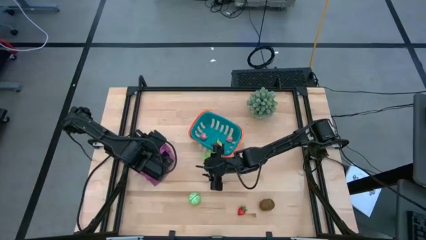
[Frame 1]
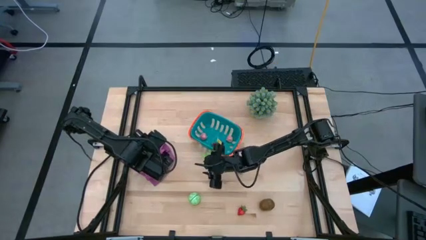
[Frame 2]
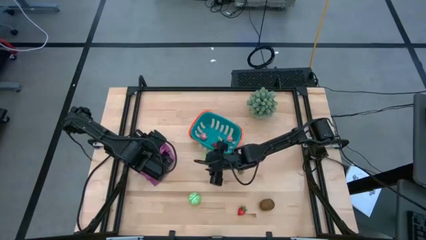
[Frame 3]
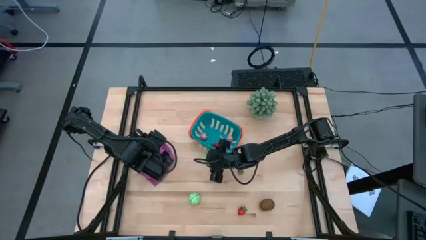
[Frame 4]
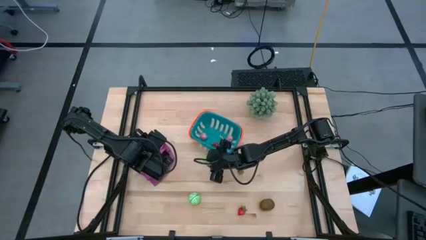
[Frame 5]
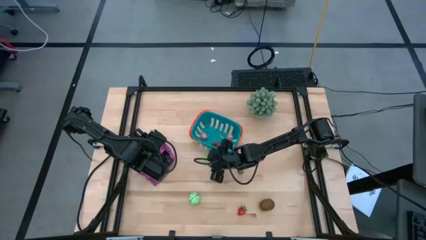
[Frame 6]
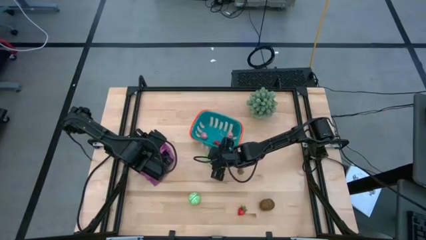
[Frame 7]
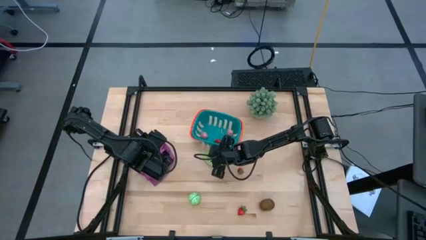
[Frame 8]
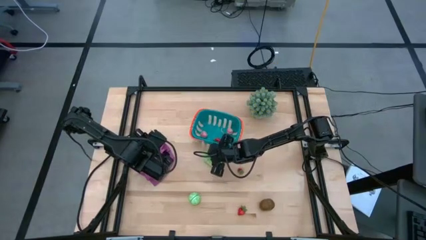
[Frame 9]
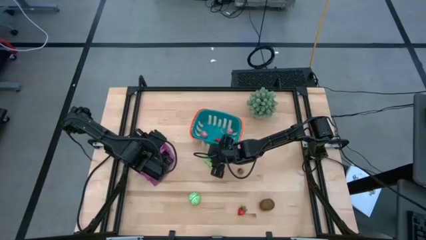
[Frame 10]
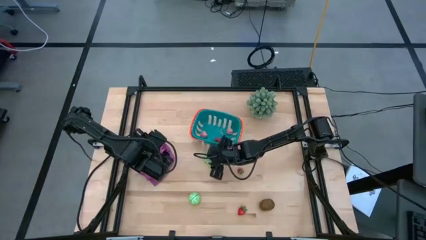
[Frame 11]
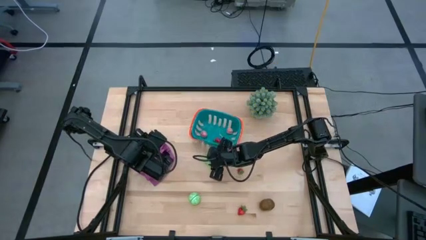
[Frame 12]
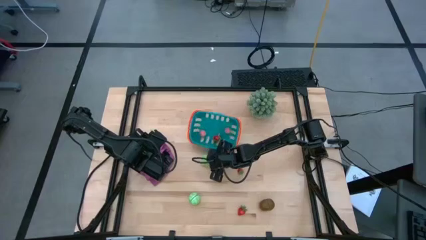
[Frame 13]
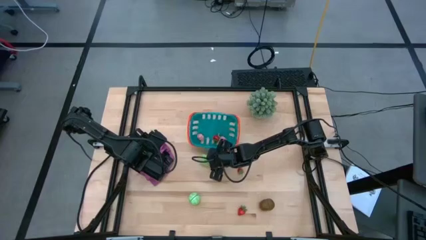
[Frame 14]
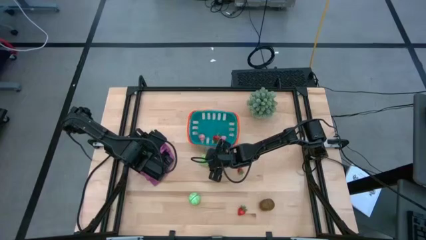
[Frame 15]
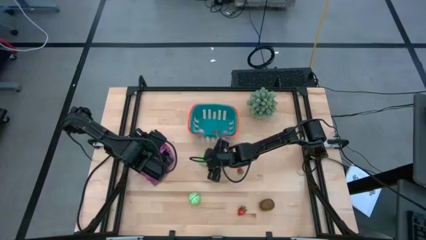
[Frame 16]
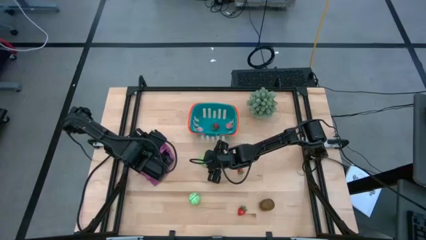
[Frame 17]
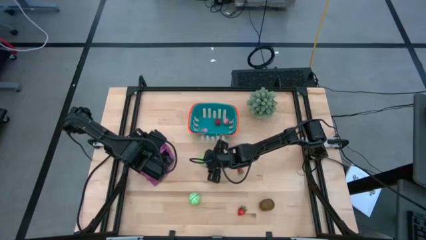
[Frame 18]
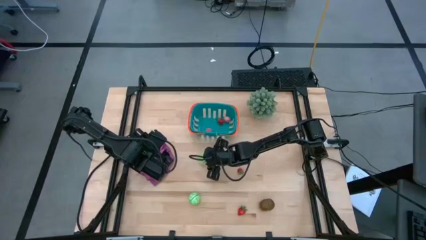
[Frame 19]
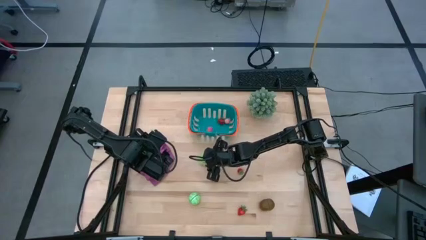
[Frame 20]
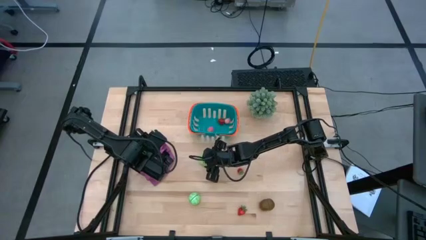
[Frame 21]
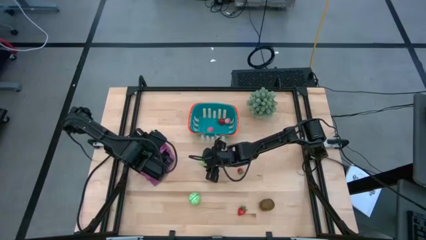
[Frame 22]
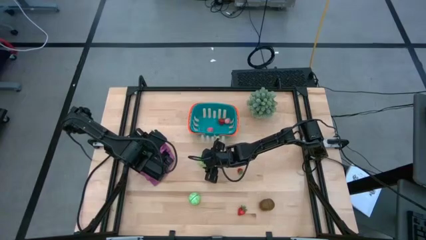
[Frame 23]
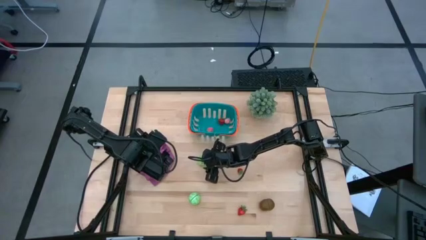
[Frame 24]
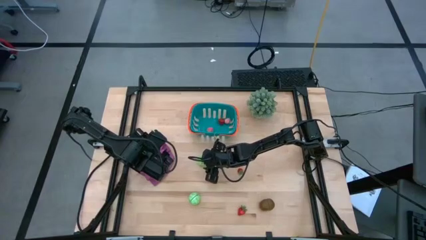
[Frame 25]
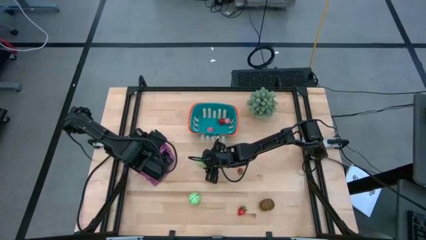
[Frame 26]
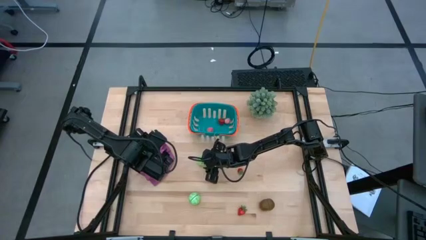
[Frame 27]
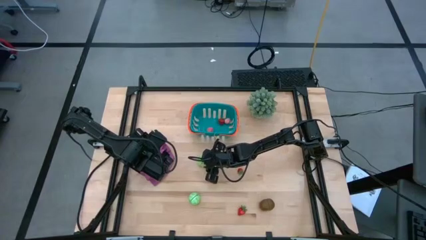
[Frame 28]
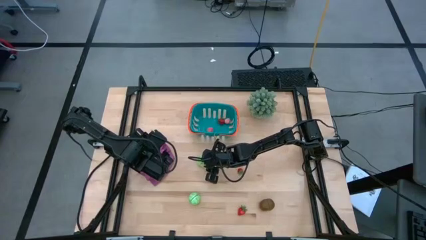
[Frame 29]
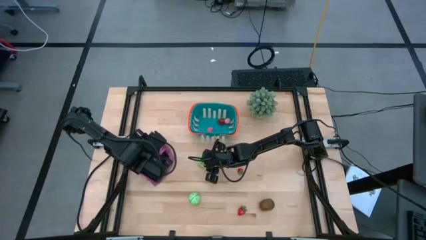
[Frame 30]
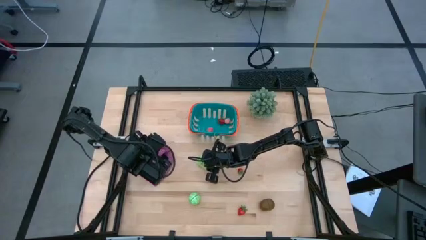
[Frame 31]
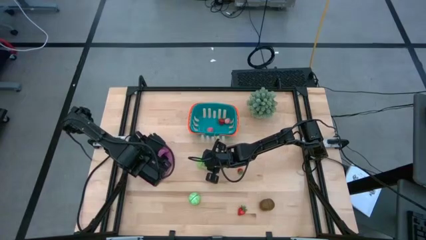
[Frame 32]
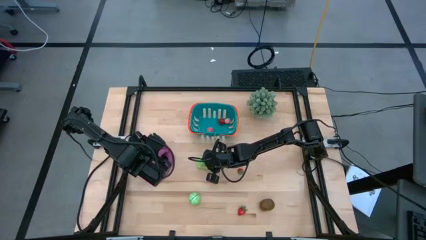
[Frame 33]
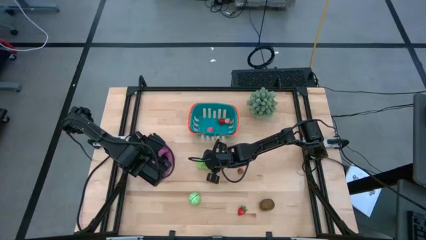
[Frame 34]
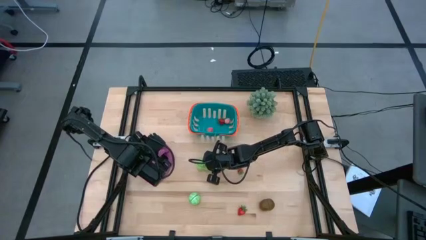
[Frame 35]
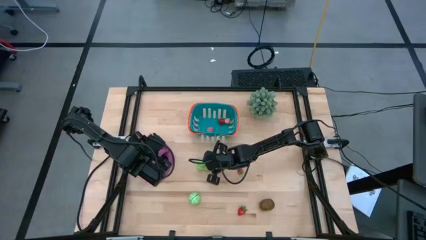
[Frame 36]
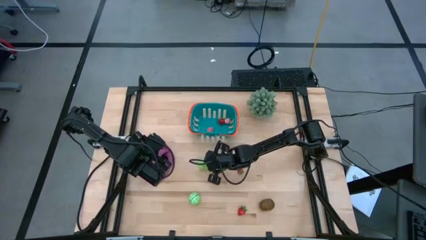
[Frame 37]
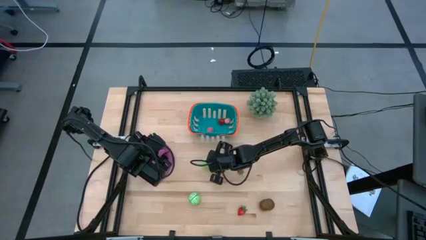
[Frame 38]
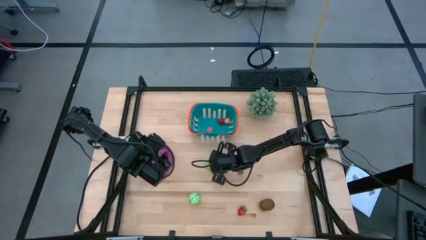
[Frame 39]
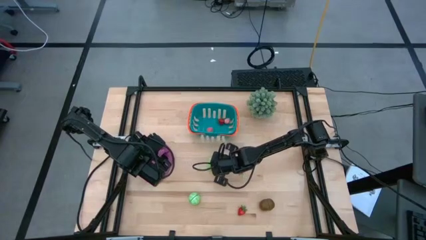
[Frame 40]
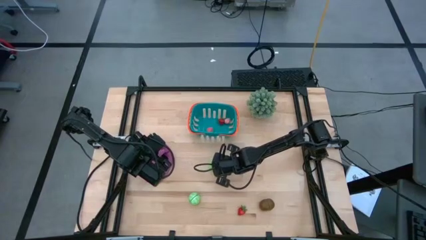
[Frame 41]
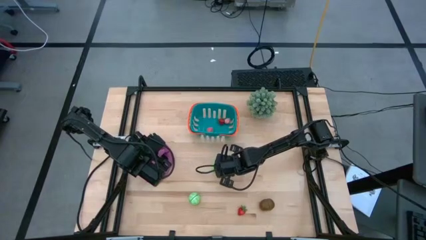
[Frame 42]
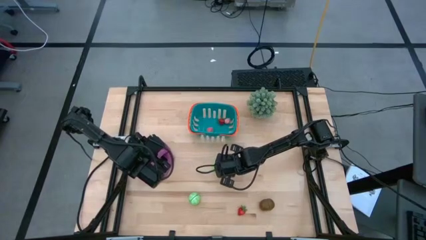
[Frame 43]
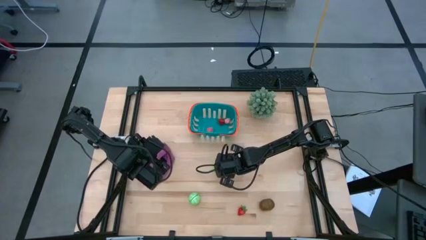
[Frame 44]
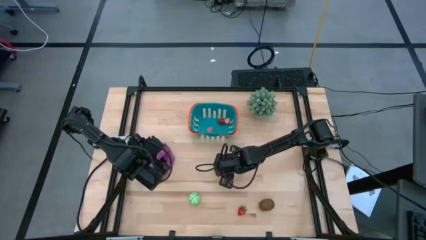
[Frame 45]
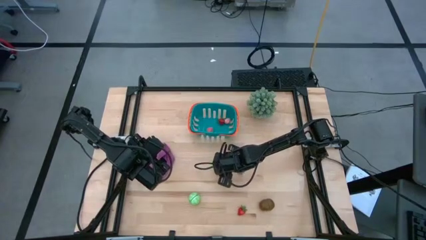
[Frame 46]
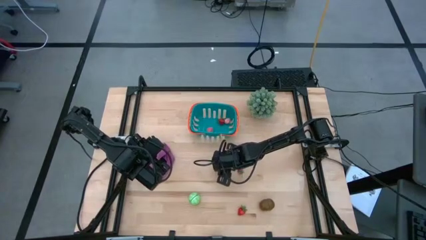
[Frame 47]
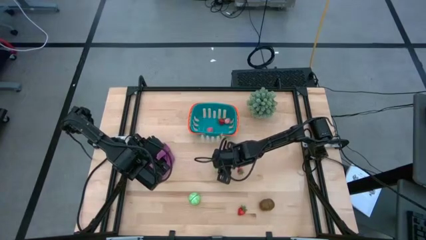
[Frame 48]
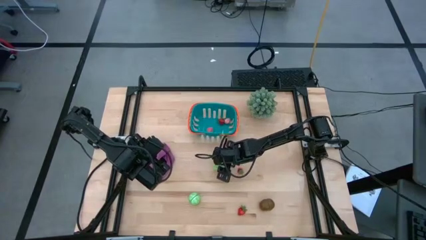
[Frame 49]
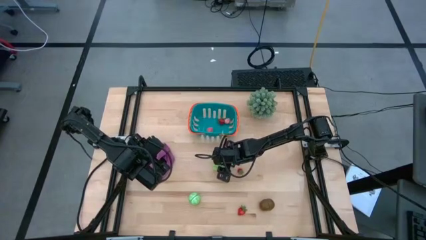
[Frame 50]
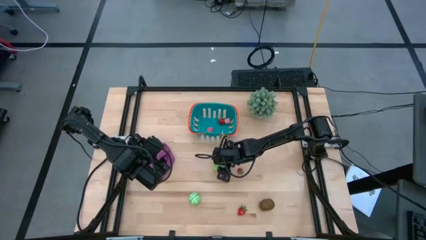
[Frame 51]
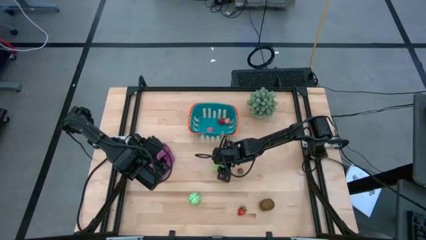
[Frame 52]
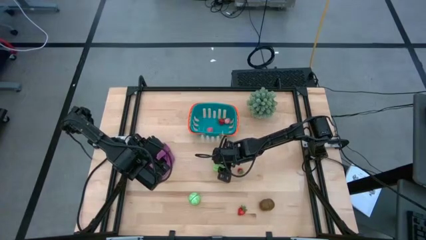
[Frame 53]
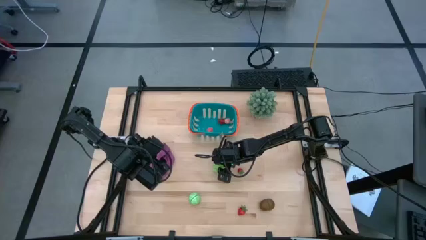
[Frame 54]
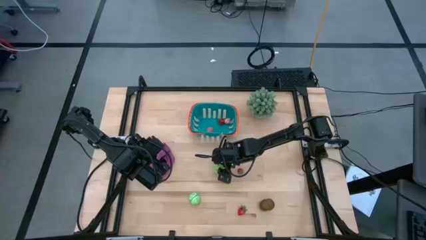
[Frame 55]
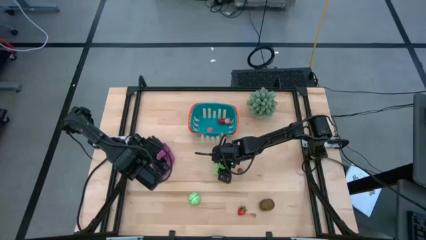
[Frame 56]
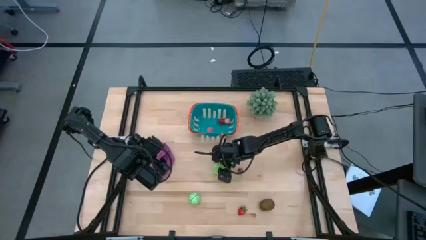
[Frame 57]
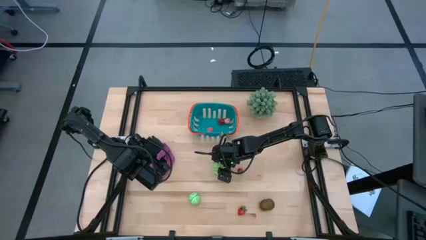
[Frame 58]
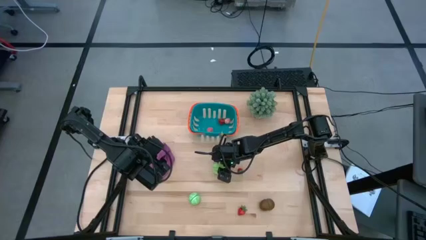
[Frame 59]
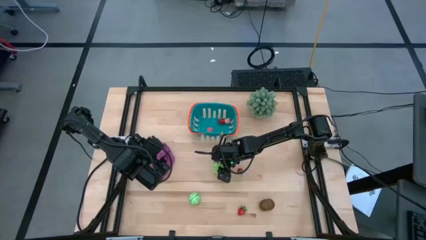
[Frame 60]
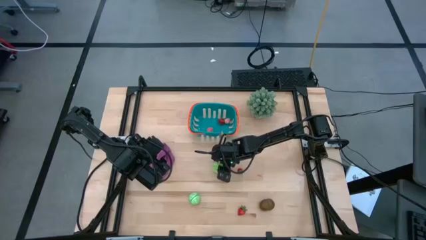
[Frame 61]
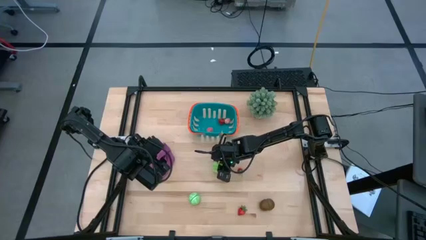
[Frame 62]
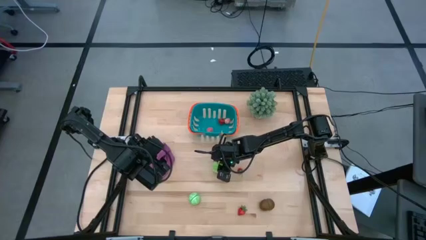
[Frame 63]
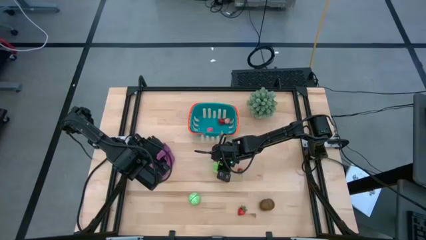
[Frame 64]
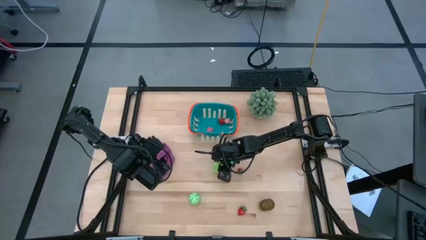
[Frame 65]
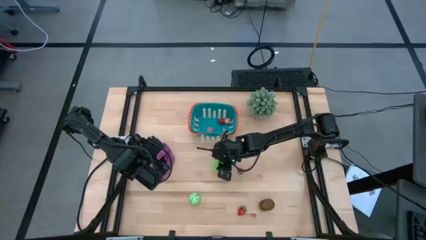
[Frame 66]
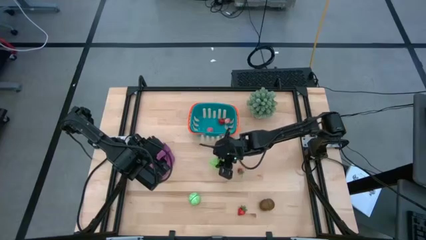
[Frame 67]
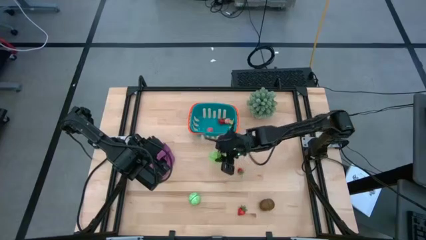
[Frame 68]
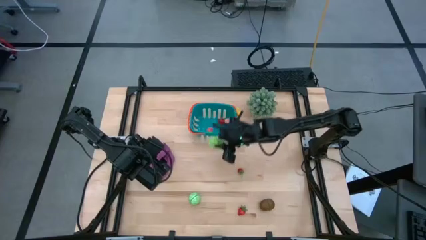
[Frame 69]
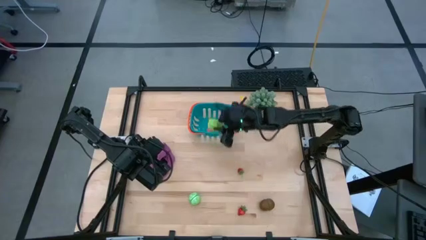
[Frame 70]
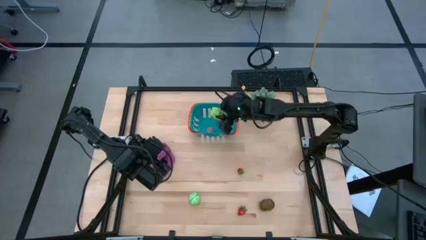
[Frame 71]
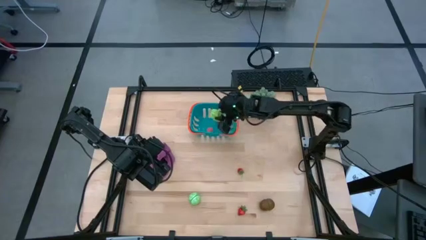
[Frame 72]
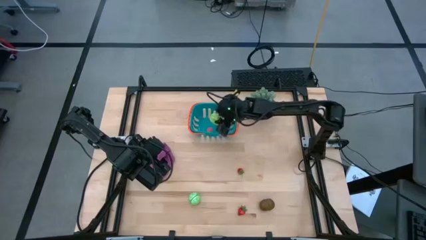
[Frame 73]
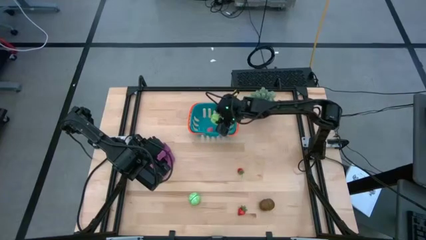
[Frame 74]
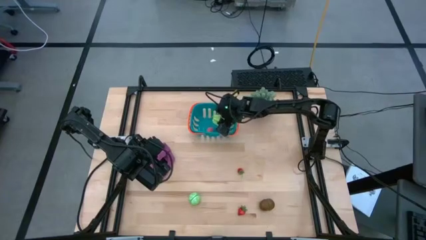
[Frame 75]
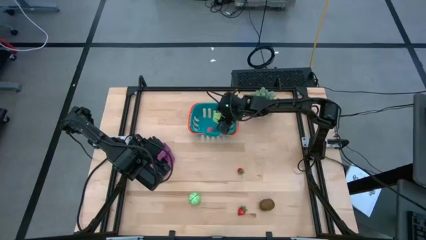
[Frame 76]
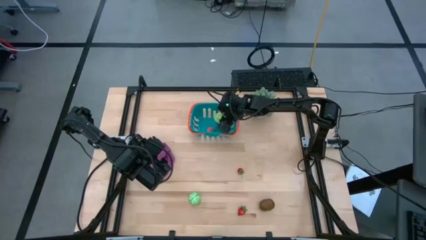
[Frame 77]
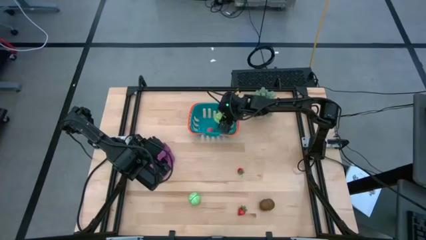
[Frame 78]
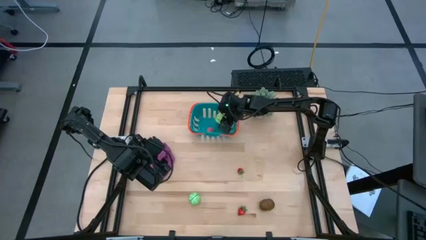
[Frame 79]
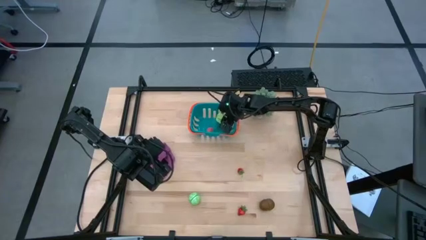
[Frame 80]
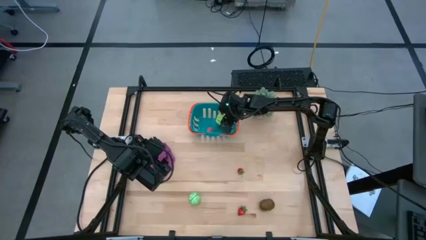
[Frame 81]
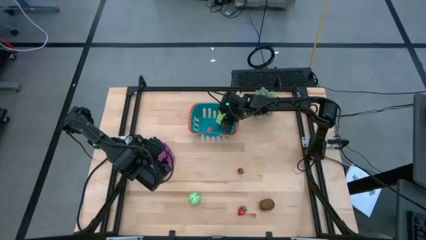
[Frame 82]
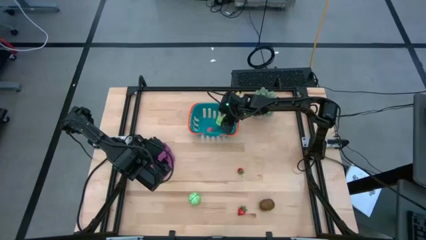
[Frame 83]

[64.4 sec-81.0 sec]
Task: Pick and placing Produce into tupperware
Put the green star fruit into the blue basket
